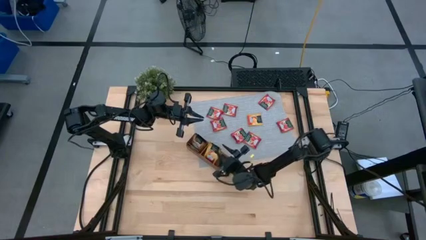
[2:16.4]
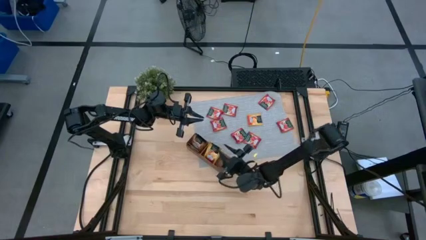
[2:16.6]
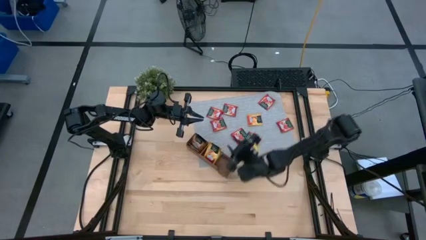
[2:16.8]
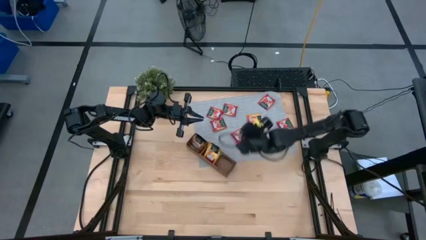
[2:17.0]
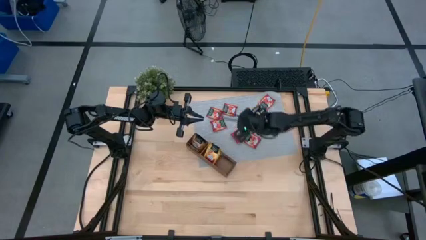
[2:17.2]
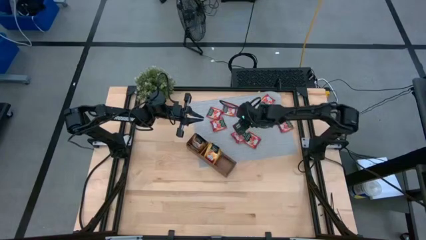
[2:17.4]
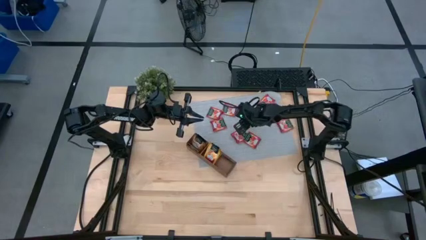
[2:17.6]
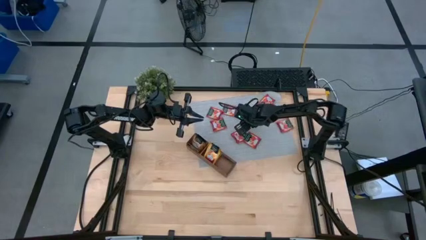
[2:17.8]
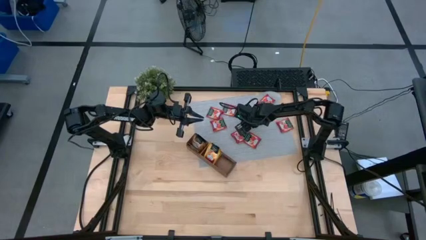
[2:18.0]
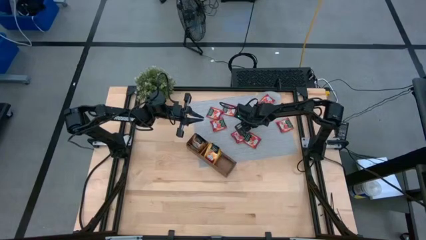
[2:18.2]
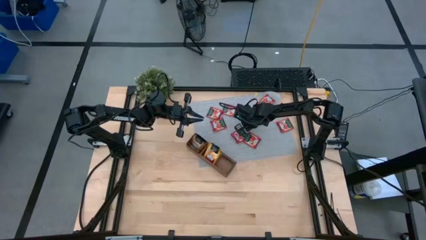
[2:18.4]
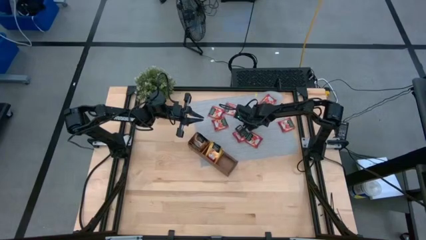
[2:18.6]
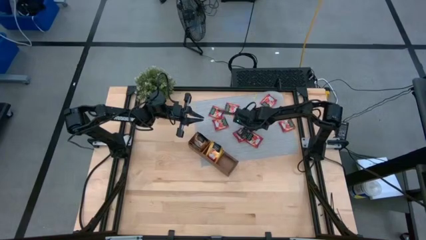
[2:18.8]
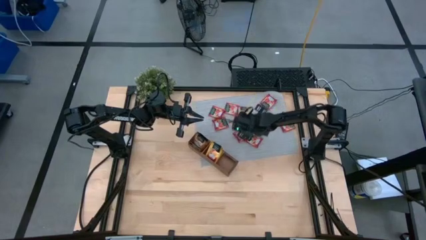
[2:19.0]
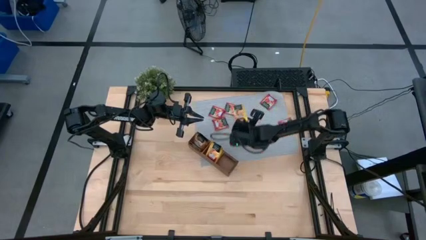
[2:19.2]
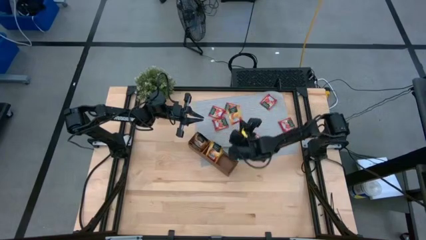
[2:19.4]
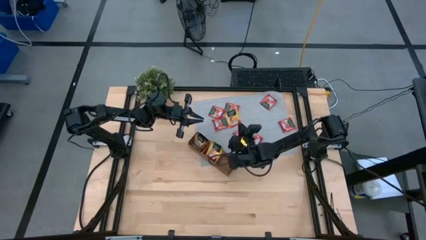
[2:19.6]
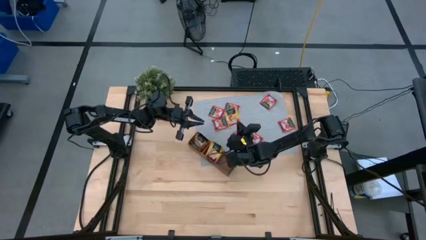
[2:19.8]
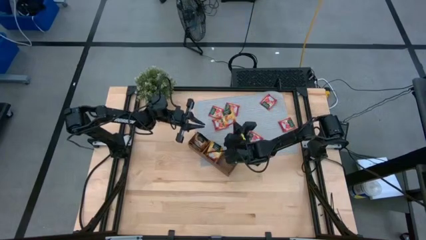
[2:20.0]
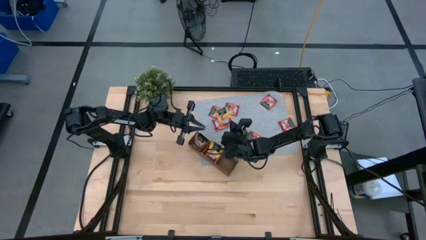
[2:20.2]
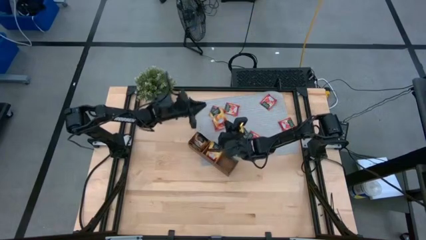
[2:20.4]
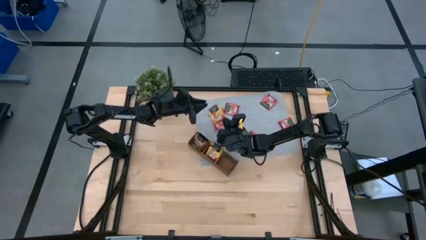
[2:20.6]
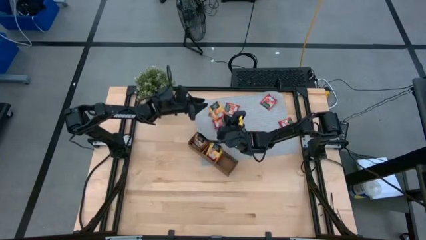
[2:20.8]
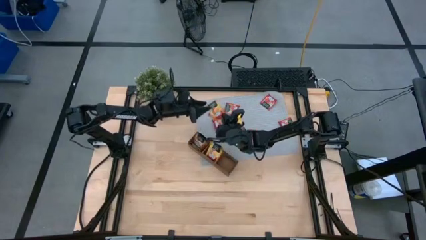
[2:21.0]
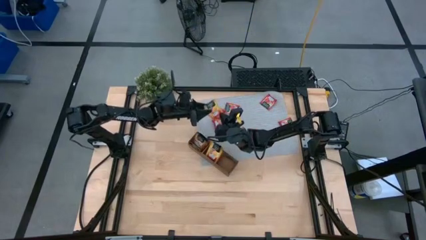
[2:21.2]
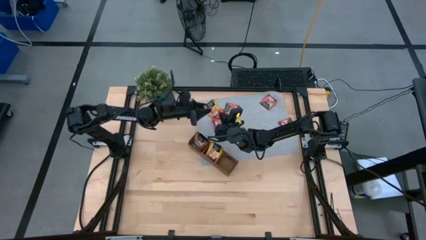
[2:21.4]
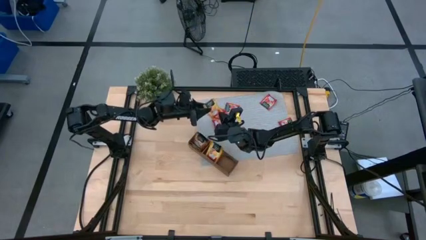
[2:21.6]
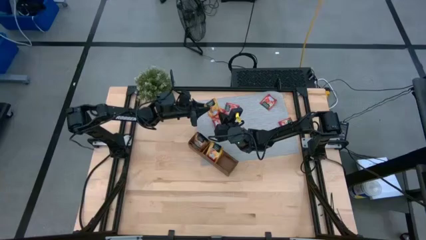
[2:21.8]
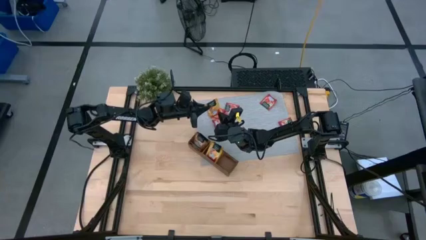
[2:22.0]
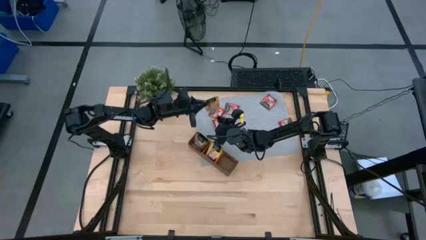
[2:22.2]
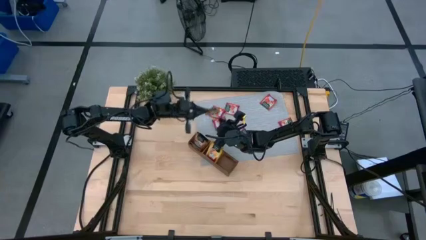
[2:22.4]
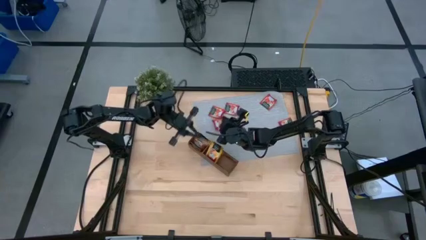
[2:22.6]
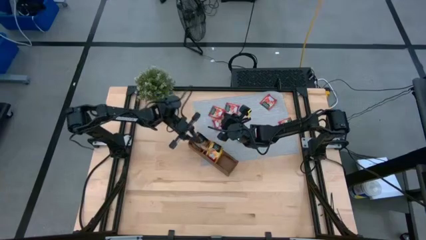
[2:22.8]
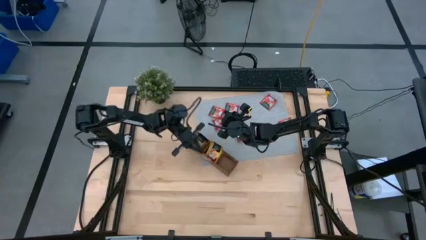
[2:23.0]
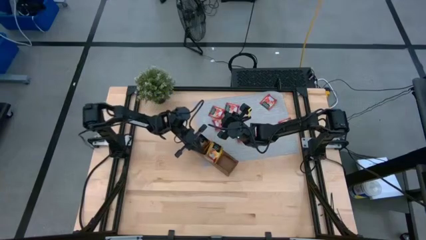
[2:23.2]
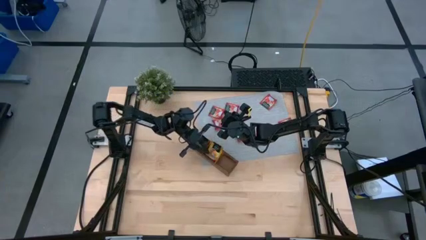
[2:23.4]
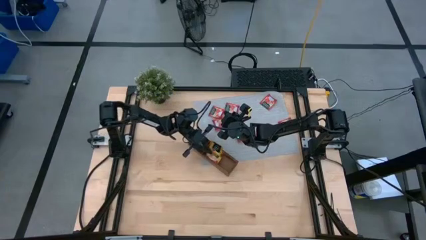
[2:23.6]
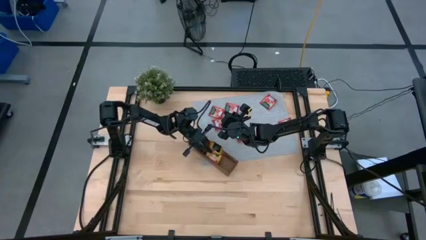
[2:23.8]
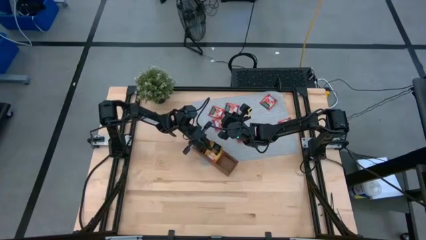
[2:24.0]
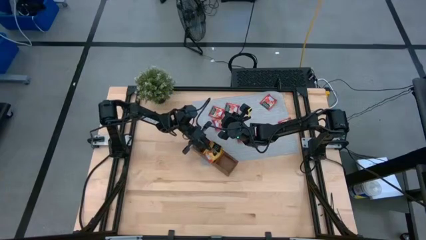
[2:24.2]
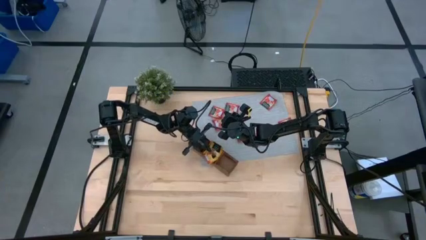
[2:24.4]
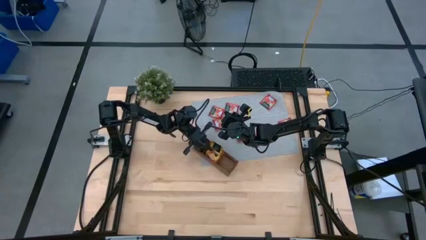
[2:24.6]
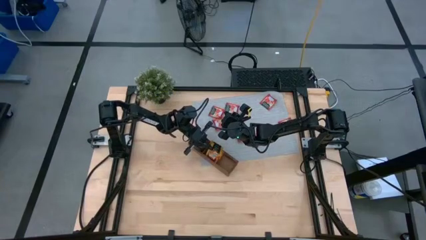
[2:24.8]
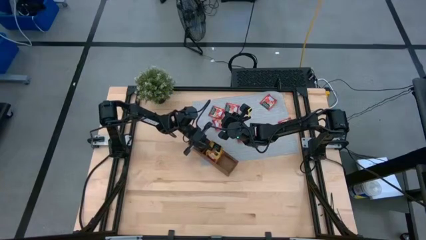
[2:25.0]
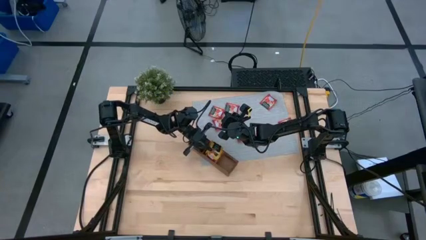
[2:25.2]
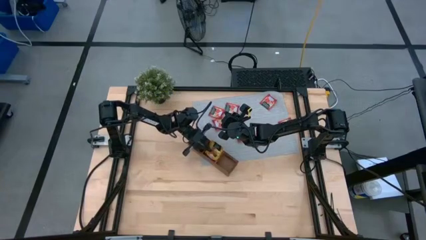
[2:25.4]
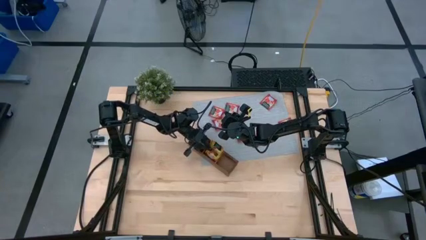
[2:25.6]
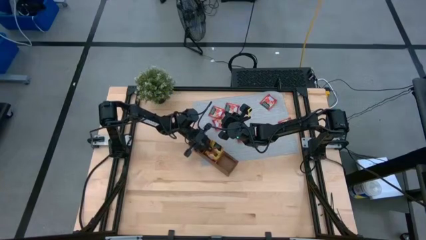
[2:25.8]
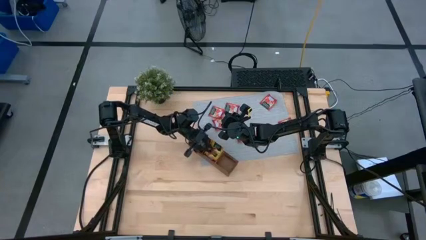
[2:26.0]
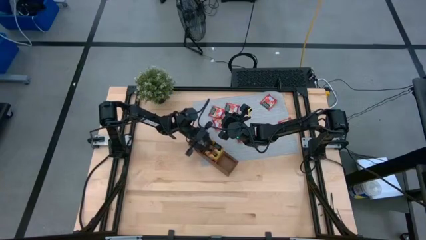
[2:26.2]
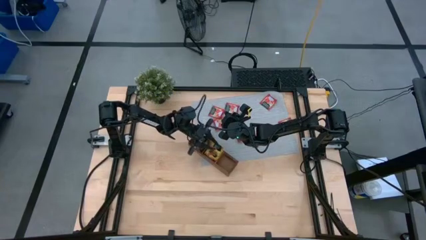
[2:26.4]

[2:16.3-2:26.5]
Task: Pick & Place Tea
Put the yellow tea bag into the middle section of the wooden organizer

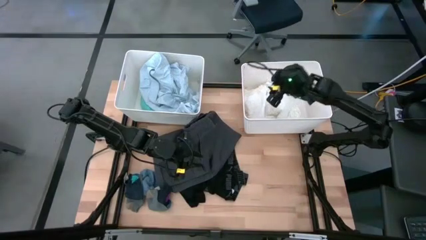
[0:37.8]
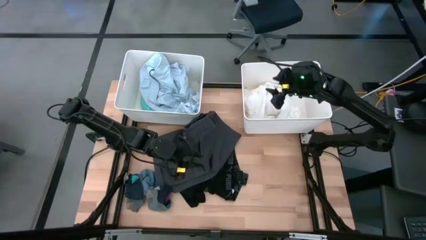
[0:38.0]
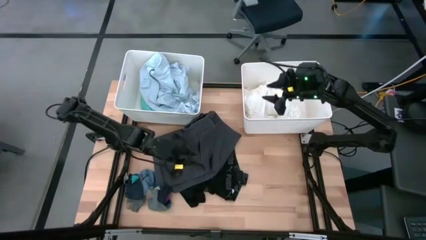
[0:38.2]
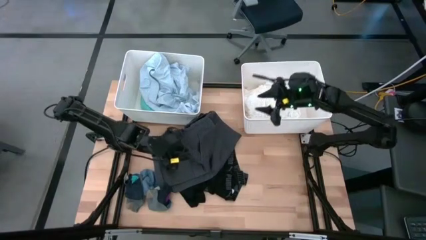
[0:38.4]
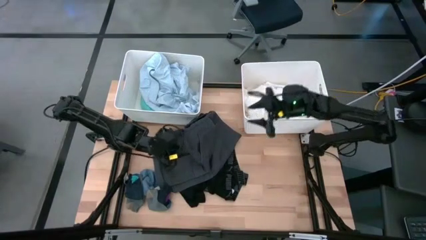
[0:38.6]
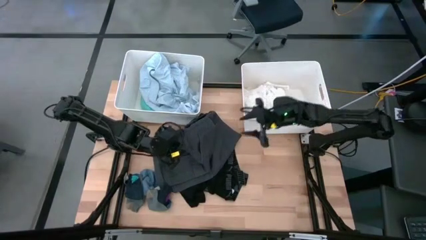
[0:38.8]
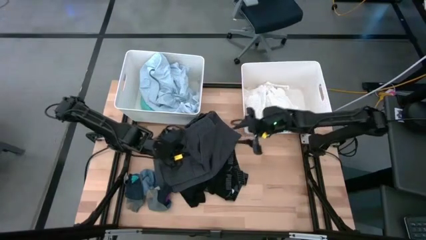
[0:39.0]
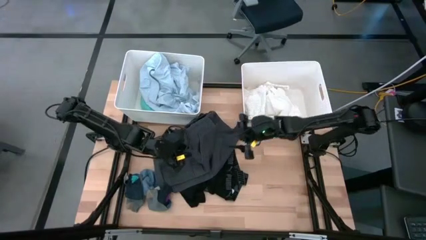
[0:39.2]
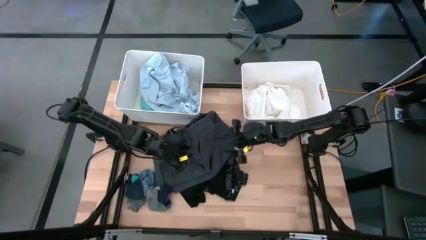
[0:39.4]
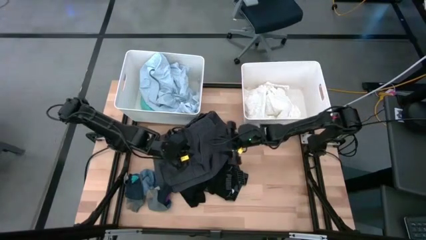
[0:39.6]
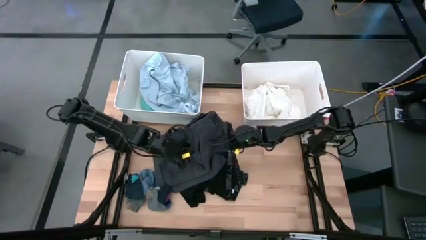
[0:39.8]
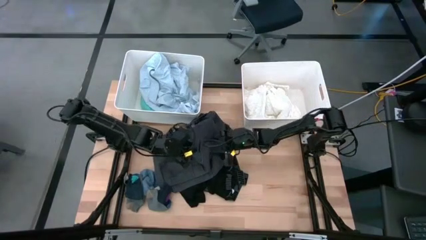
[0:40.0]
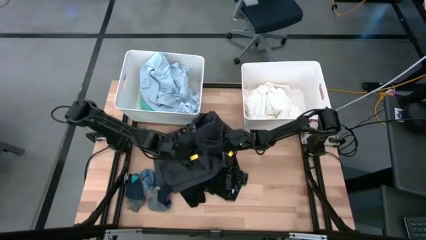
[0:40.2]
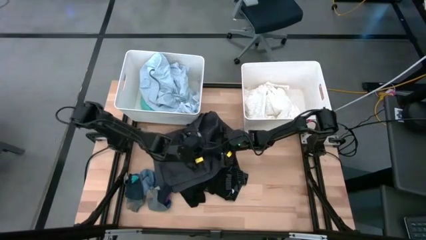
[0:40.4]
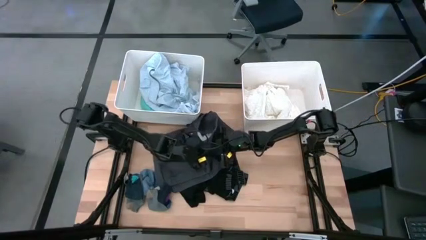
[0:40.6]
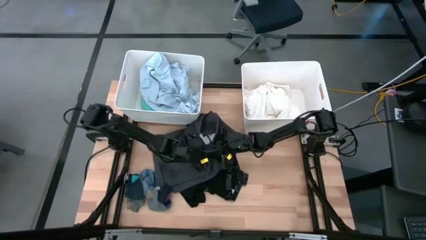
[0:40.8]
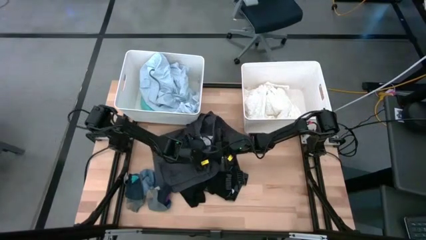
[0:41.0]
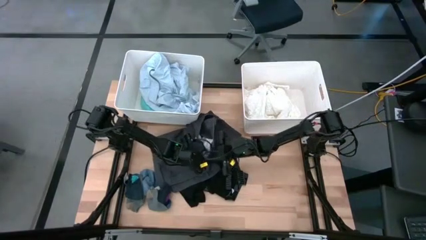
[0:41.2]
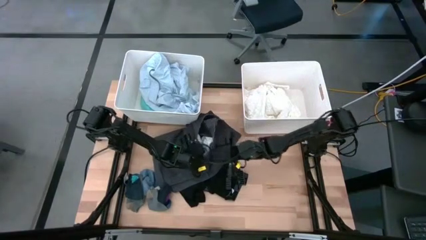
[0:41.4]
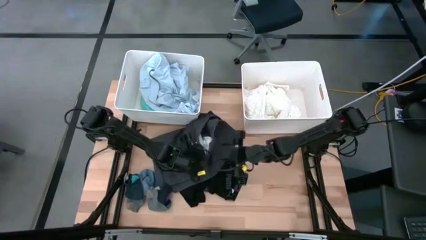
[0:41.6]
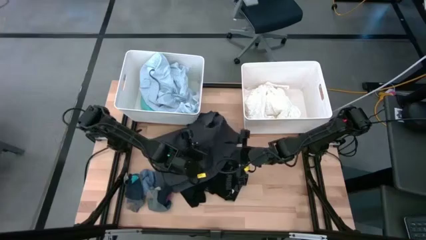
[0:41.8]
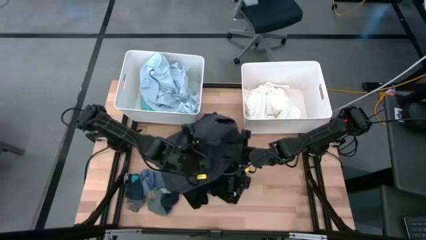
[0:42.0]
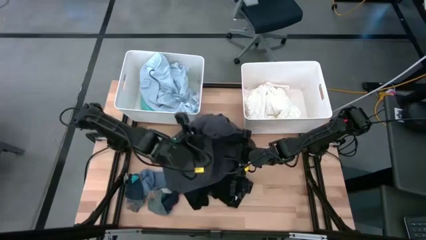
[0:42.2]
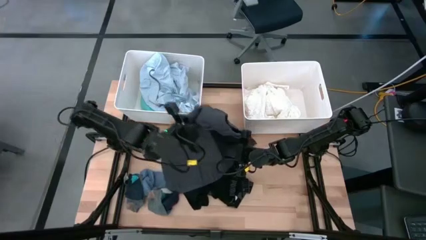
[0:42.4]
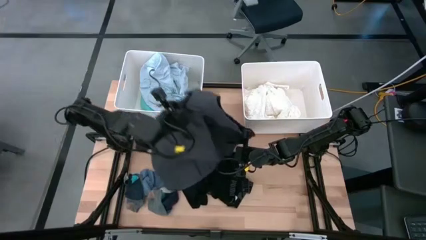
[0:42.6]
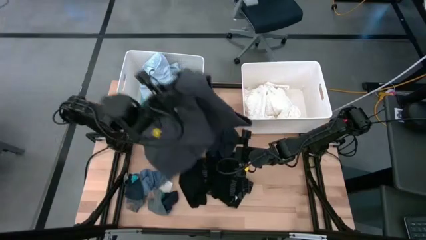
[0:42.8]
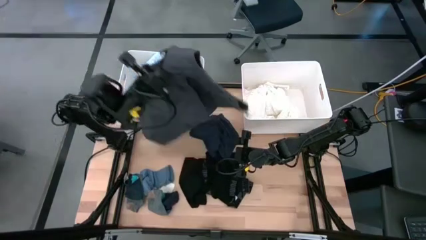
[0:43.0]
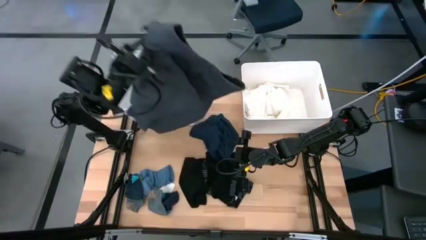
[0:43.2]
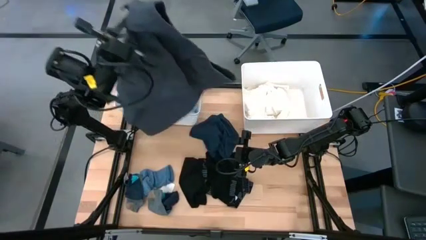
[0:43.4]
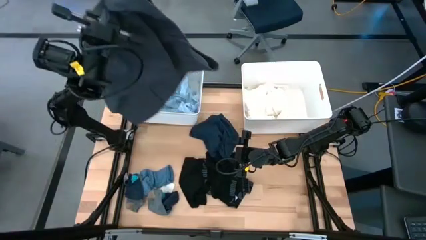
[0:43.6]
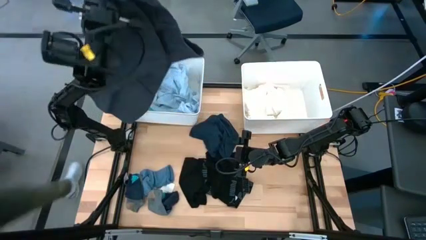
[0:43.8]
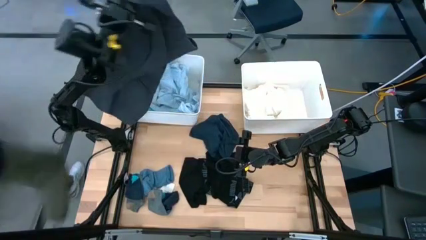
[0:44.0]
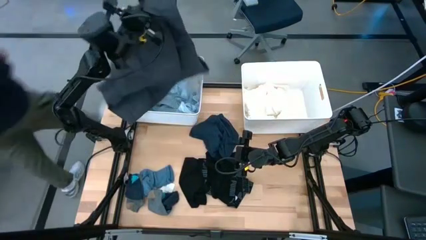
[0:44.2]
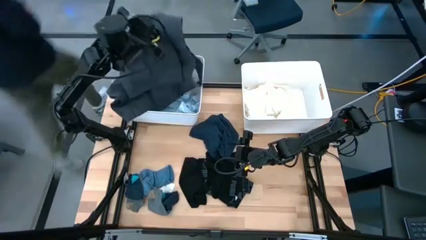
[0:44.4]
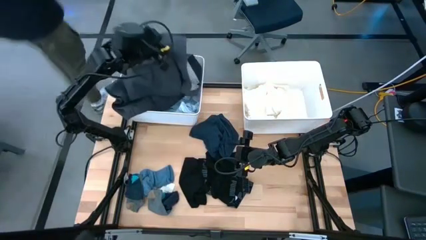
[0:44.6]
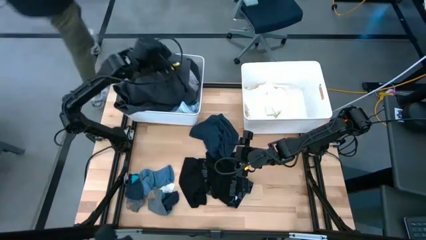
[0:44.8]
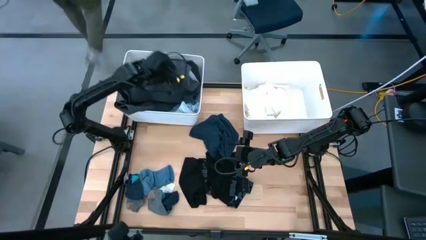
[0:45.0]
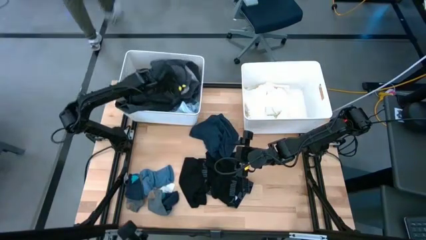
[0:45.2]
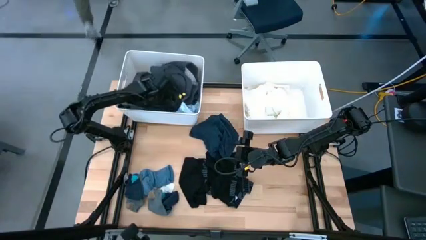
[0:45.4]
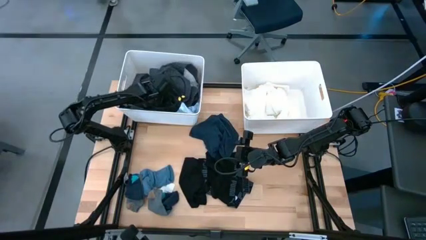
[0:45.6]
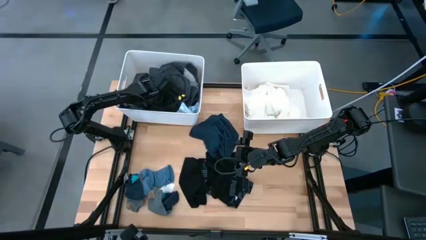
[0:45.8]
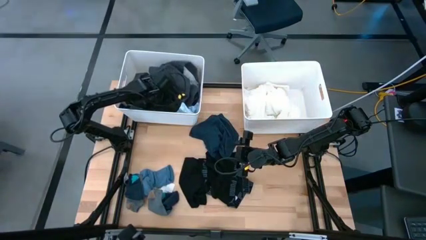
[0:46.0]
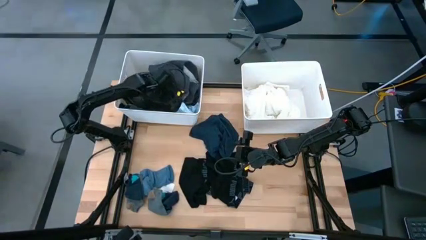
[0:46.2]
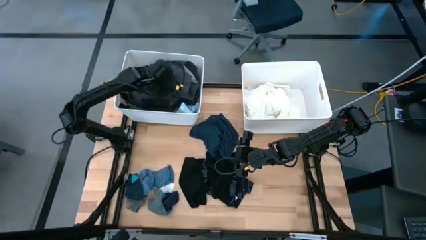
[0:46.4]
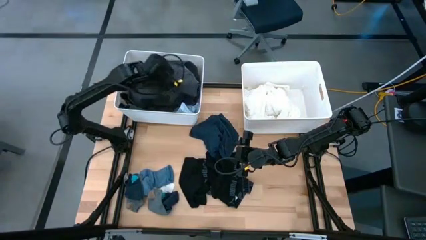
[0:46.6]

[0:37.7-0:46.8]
Task: Sort clothes
Put the dark gray shorts into the left white laundry bin
